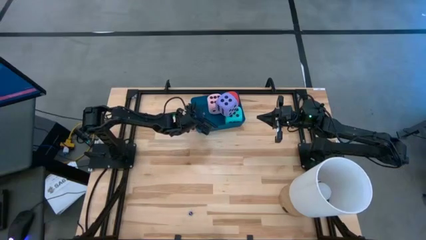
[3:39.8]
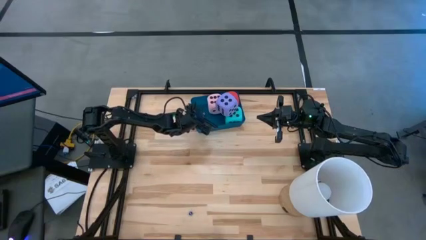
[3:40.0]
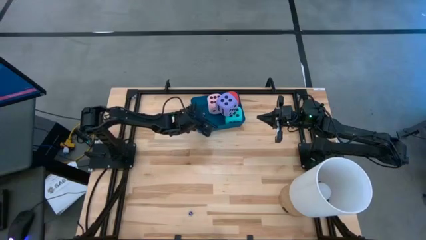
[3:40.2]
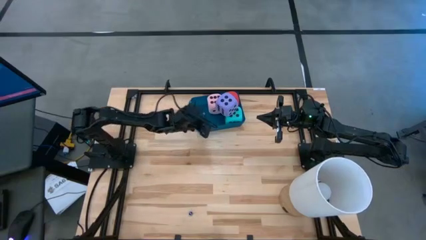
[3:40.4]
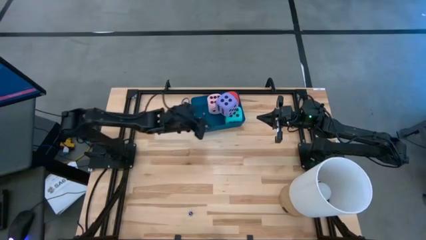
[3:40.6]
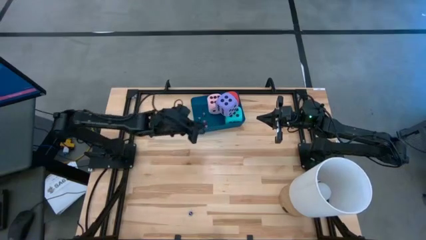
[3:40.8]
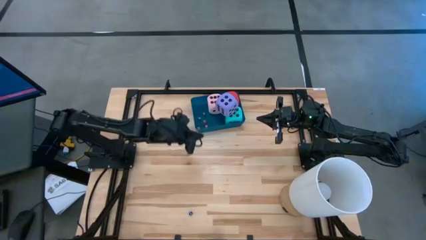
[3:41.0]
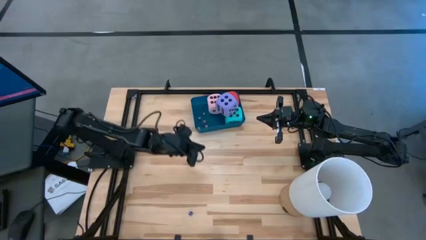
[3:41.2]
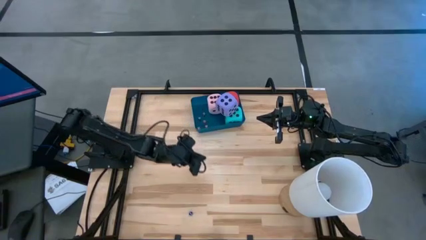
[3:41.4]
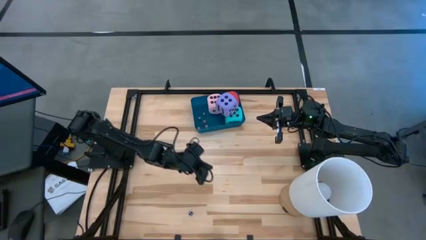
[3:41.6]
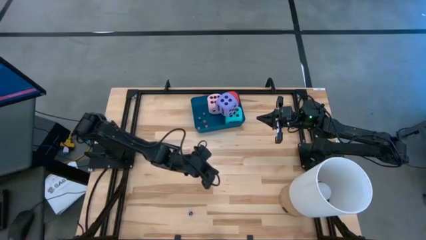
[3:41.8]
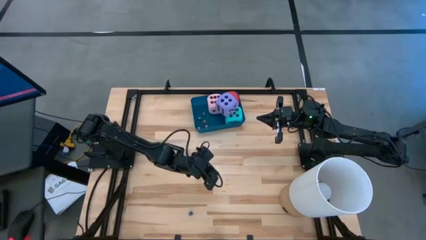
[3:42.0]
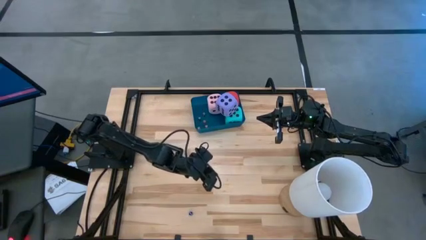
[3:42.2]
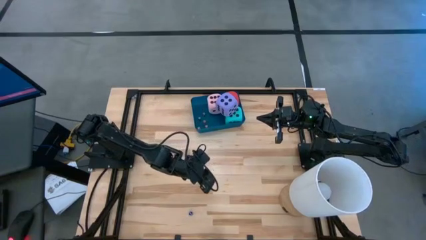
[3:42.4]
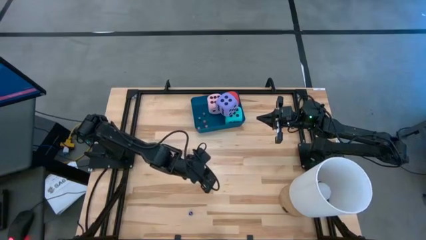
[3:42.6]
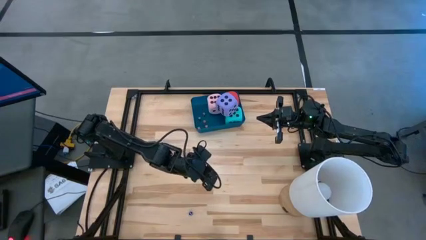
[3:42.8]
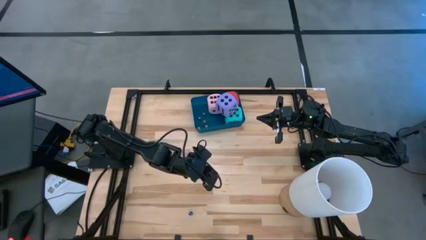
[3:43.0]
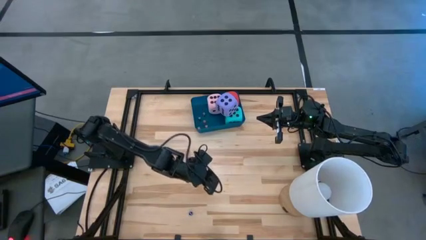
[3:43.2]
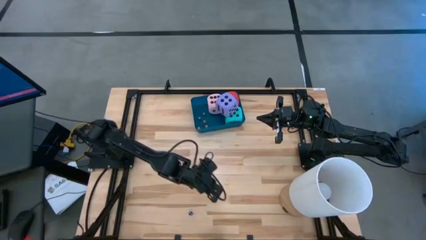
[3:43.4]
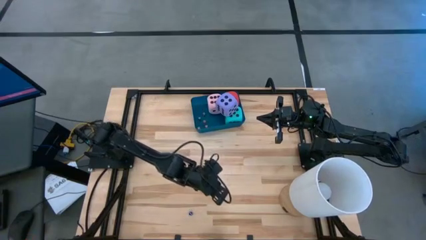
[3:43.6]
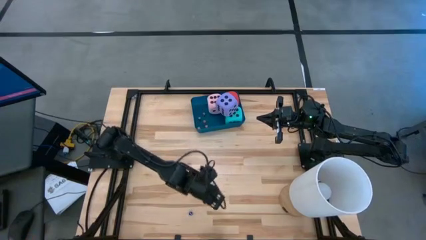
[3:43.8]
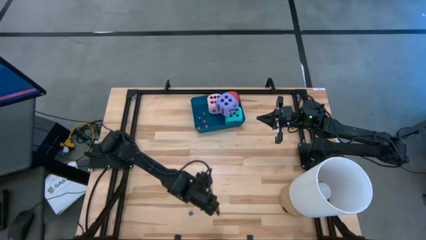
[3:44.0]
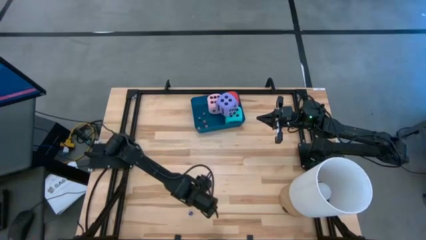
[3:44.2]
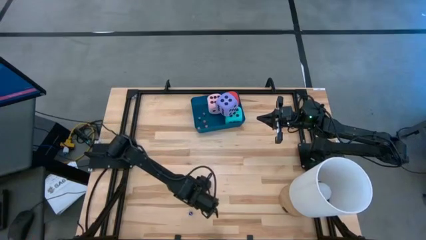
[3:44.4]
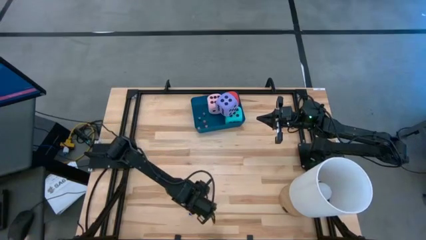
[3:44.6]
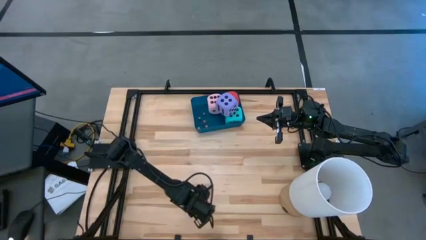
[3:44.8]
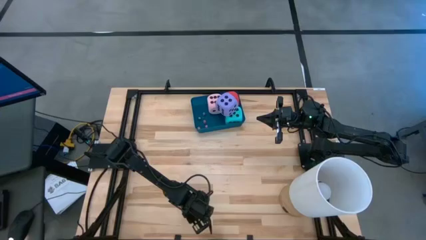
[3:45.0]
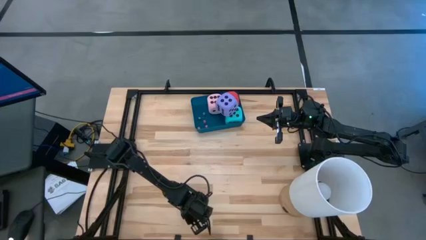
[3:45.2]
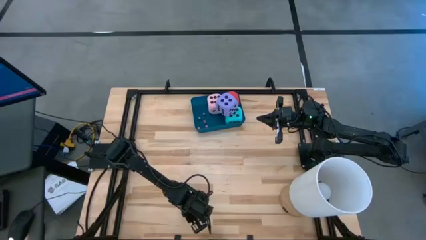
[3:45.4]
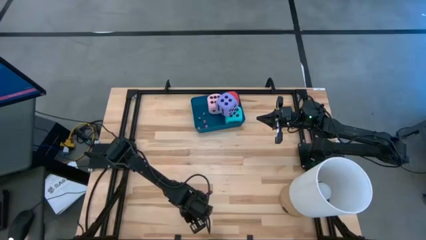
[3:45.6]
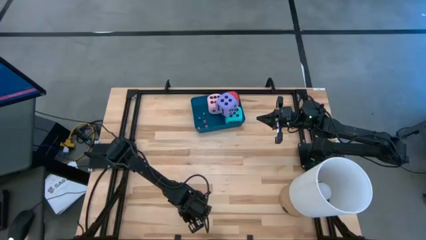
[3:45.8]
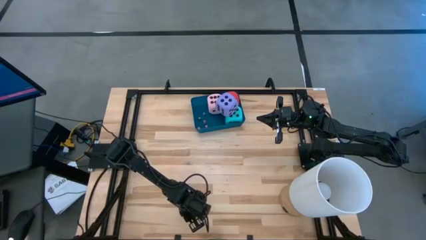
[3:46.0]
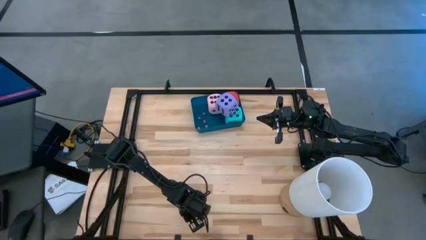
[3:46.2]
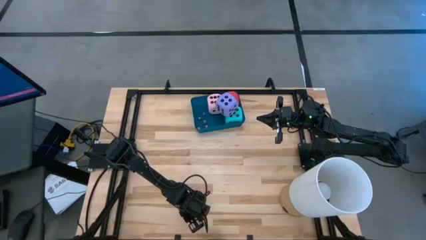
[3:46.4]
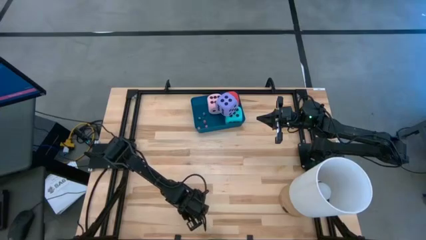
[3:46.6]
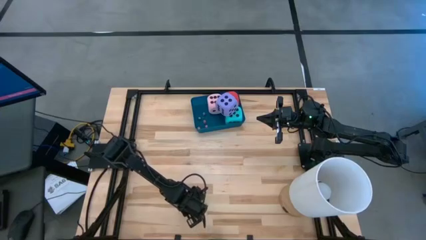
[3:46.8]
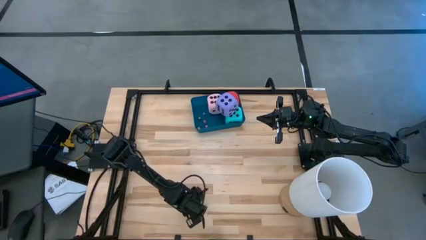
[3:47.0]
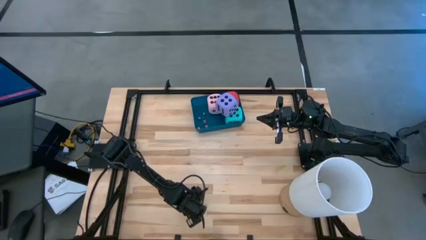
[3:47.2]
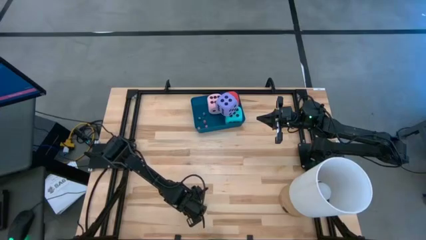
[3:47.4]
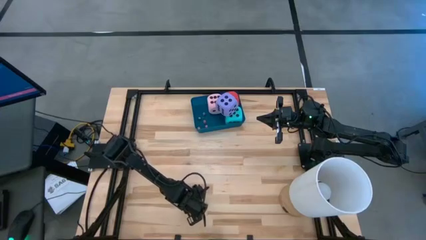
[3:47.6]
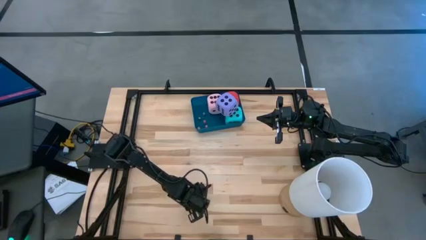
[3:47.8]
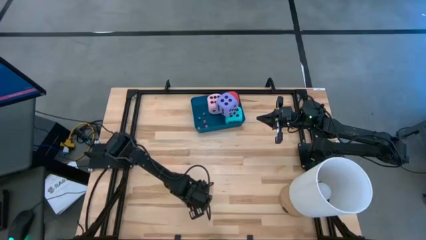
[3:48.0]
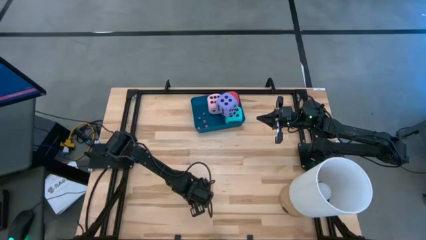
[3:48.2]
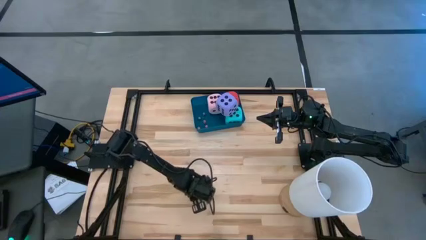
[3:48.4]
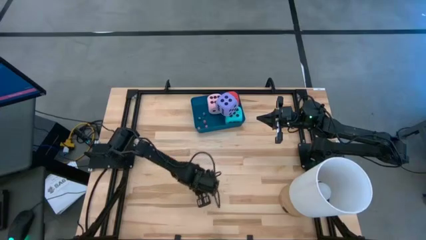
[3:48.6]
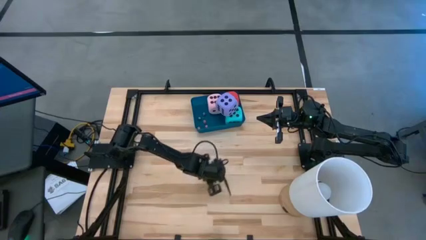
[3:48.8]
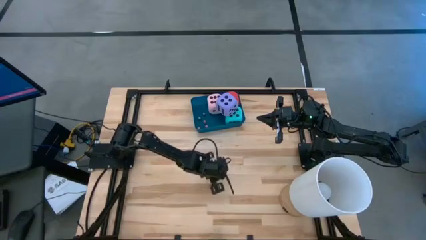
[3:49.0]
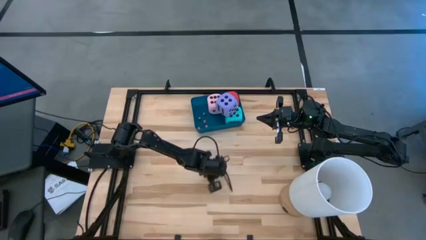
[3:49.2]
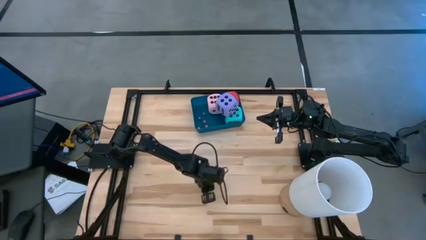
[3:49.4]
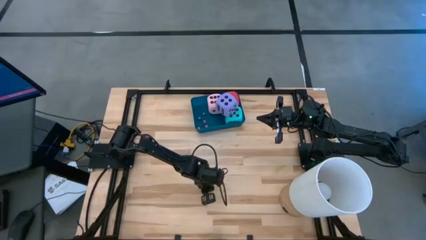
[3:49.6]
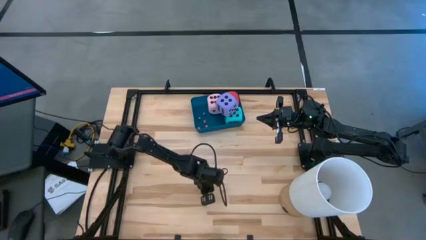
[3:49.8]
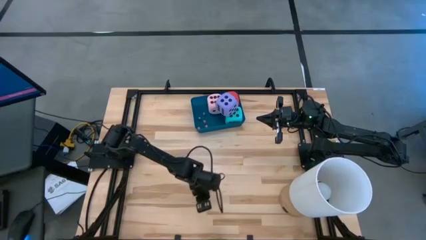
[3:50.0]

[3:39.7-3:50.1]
Task: Pick & Place Dice
Put the small blue dice into the blue bin
